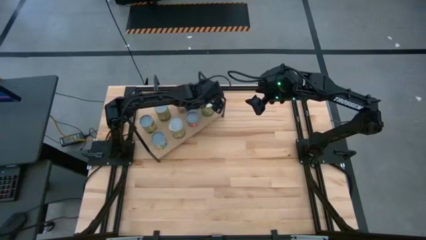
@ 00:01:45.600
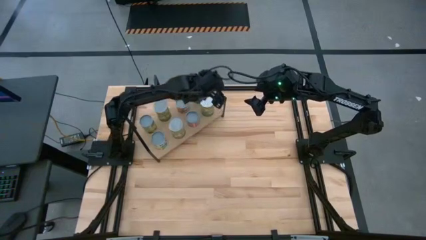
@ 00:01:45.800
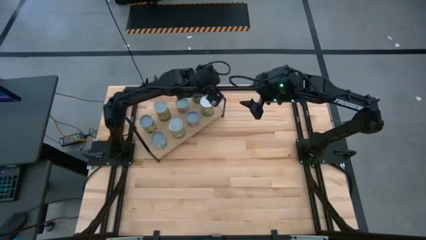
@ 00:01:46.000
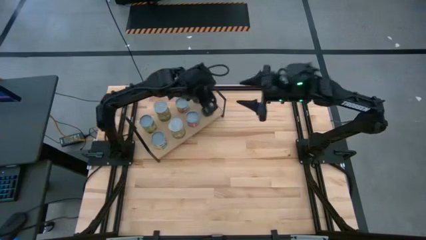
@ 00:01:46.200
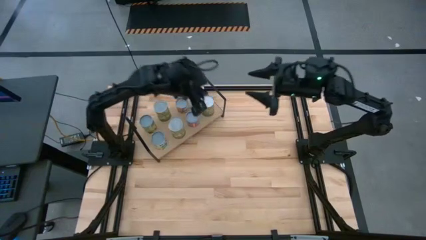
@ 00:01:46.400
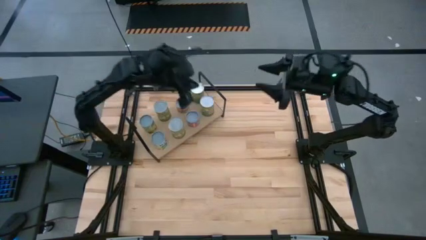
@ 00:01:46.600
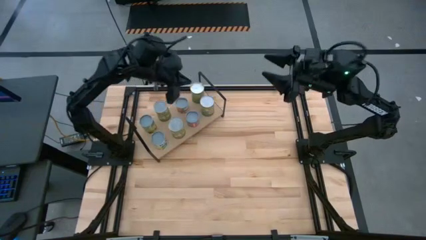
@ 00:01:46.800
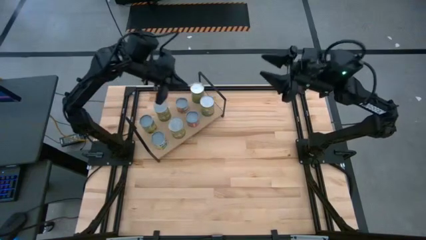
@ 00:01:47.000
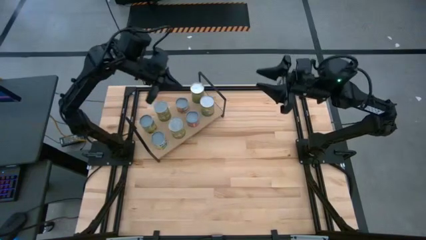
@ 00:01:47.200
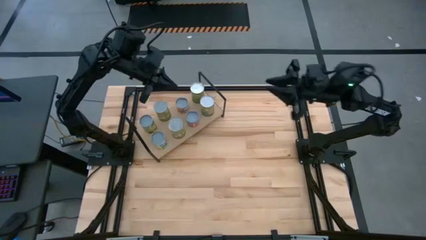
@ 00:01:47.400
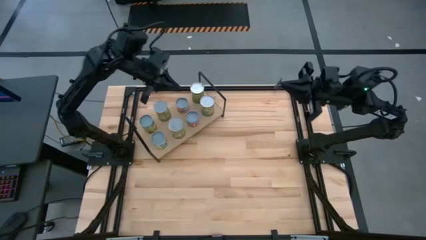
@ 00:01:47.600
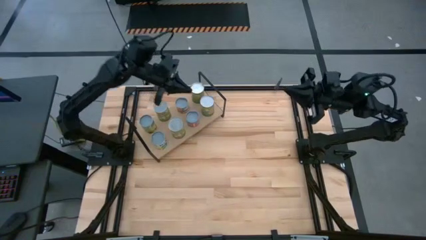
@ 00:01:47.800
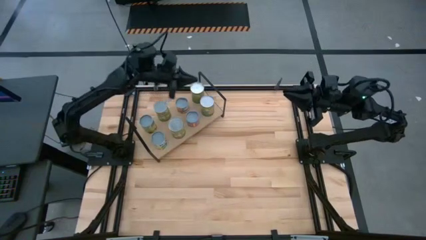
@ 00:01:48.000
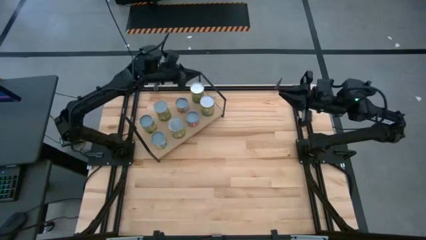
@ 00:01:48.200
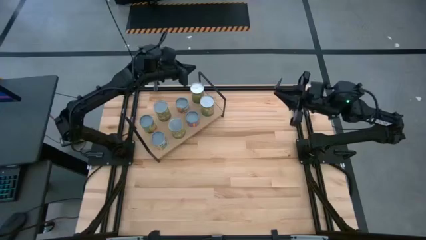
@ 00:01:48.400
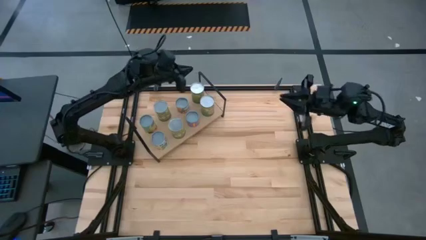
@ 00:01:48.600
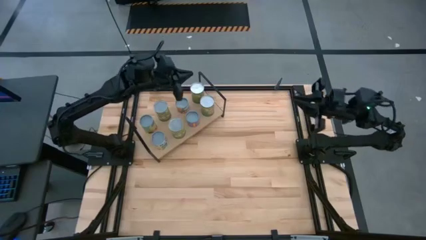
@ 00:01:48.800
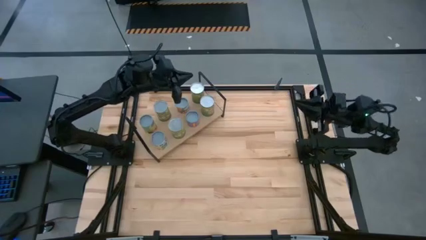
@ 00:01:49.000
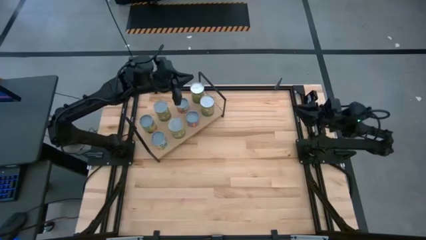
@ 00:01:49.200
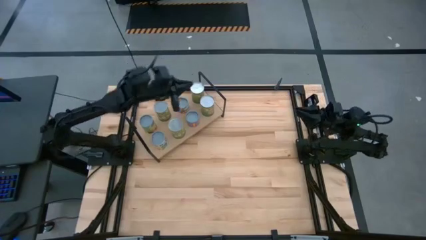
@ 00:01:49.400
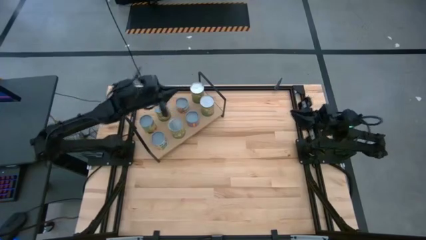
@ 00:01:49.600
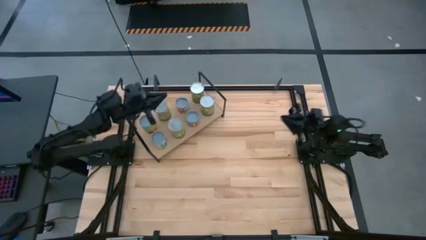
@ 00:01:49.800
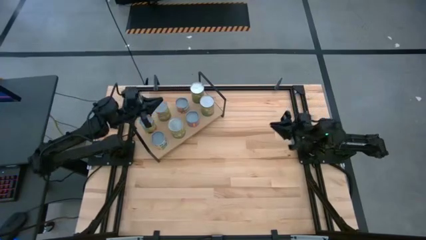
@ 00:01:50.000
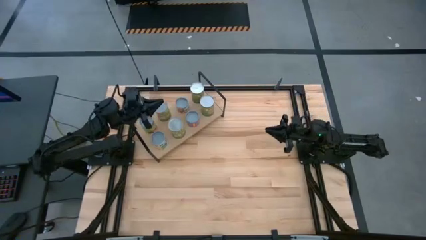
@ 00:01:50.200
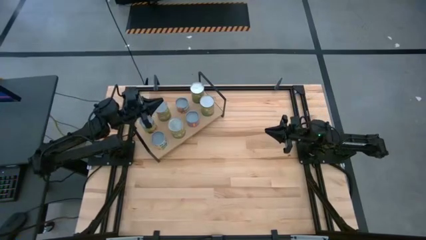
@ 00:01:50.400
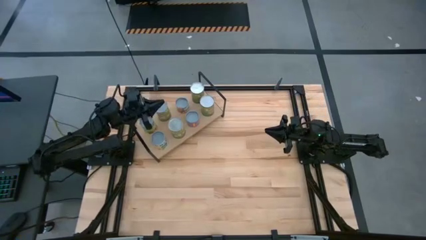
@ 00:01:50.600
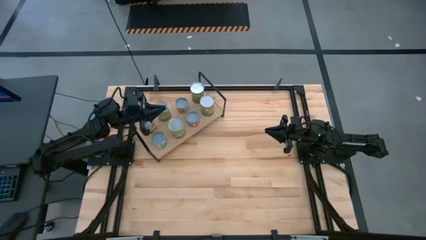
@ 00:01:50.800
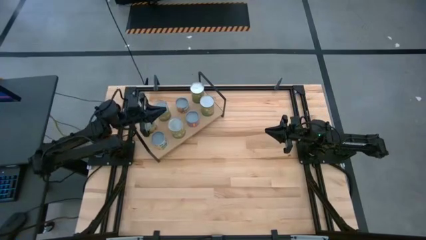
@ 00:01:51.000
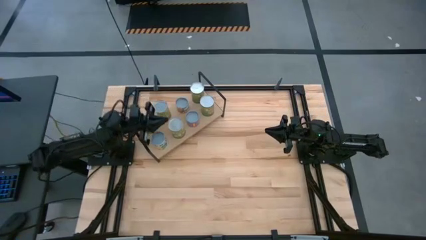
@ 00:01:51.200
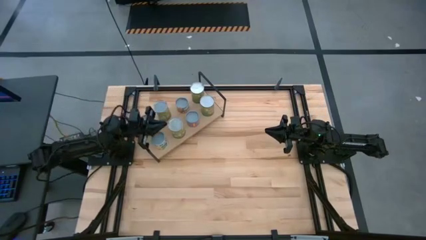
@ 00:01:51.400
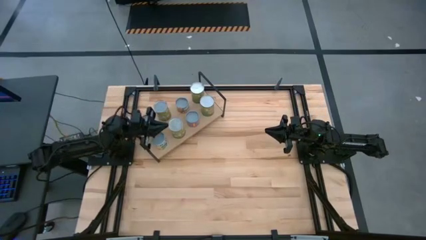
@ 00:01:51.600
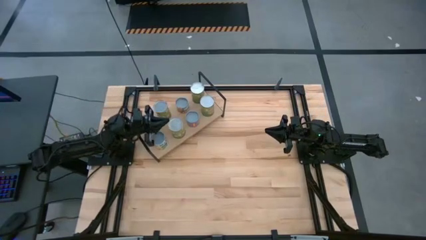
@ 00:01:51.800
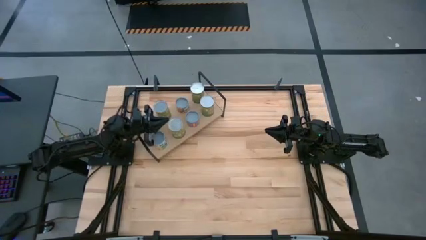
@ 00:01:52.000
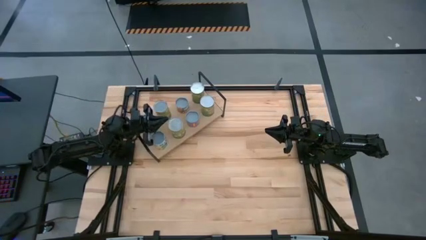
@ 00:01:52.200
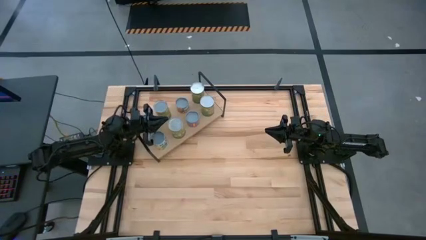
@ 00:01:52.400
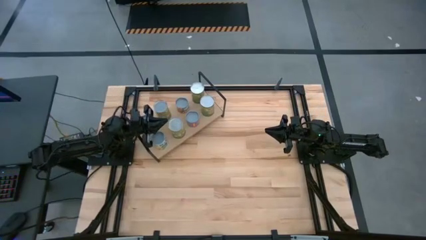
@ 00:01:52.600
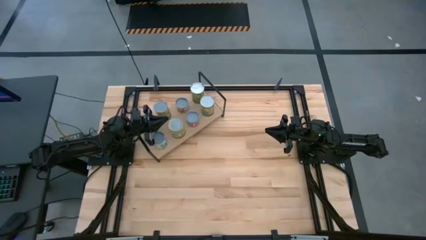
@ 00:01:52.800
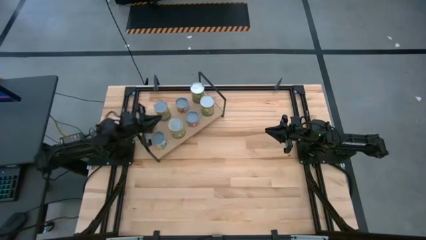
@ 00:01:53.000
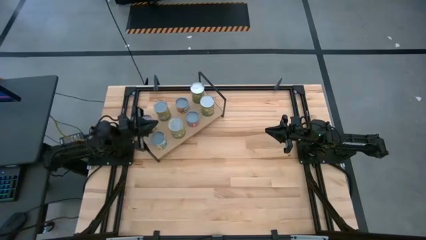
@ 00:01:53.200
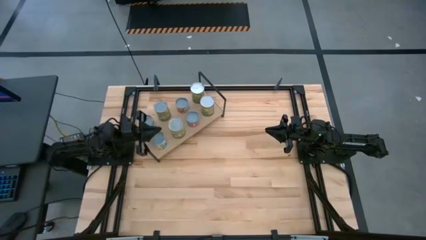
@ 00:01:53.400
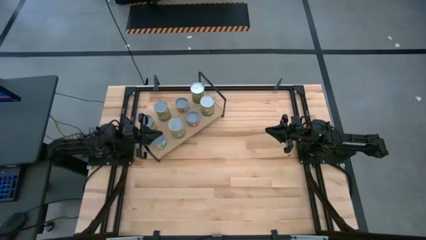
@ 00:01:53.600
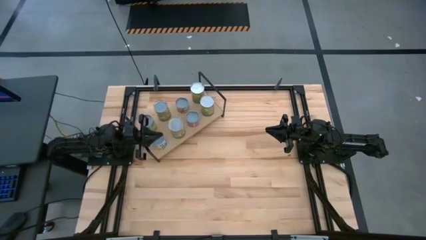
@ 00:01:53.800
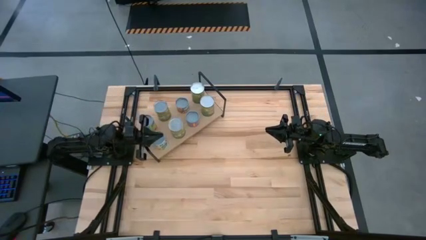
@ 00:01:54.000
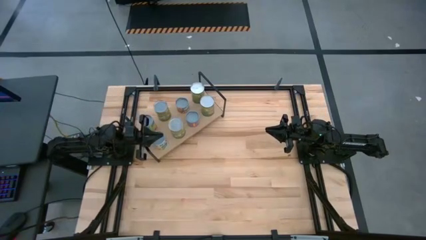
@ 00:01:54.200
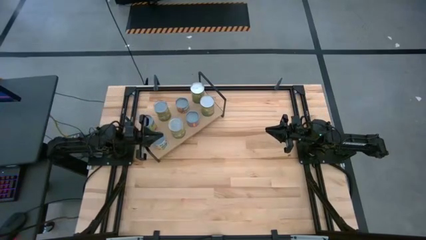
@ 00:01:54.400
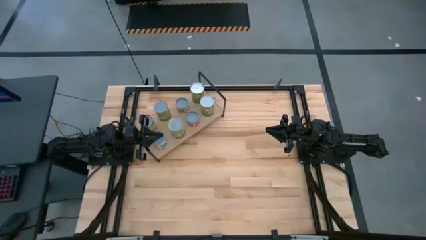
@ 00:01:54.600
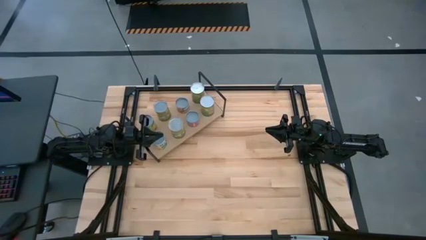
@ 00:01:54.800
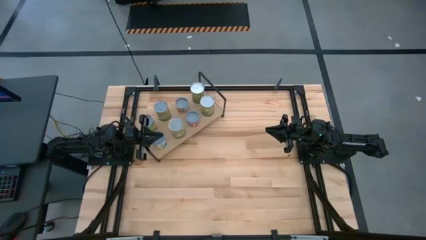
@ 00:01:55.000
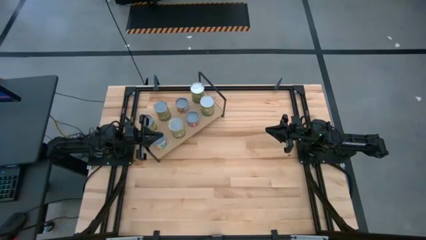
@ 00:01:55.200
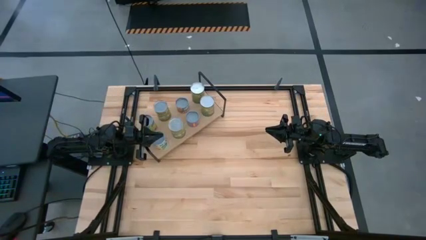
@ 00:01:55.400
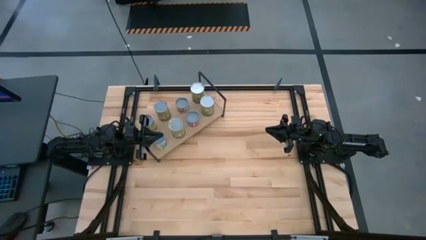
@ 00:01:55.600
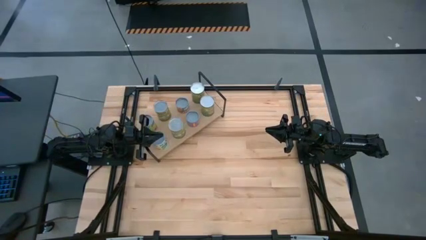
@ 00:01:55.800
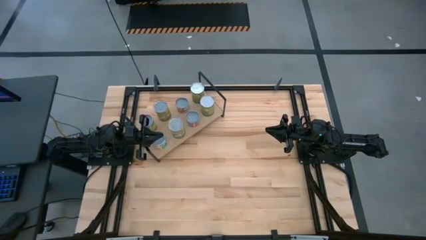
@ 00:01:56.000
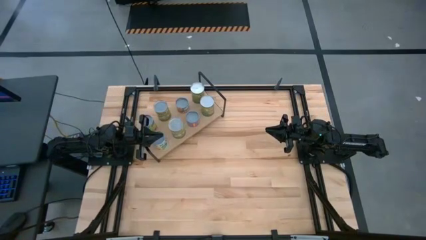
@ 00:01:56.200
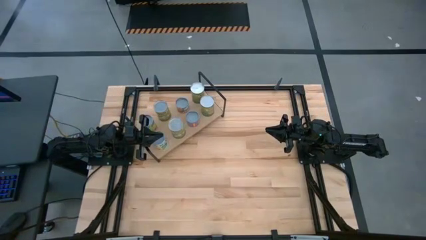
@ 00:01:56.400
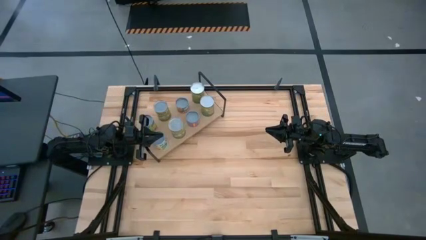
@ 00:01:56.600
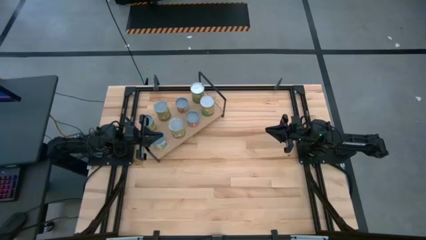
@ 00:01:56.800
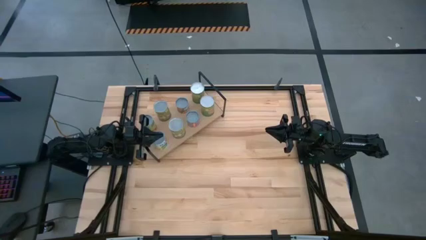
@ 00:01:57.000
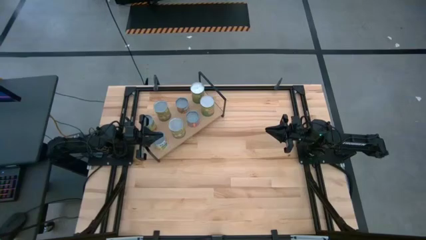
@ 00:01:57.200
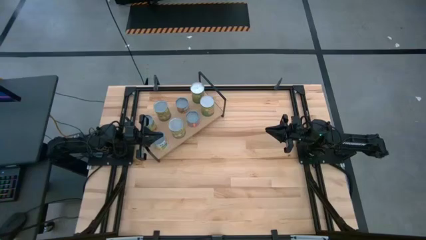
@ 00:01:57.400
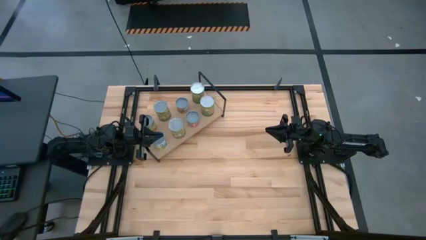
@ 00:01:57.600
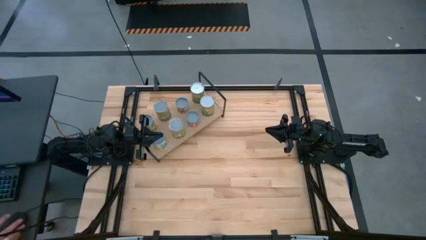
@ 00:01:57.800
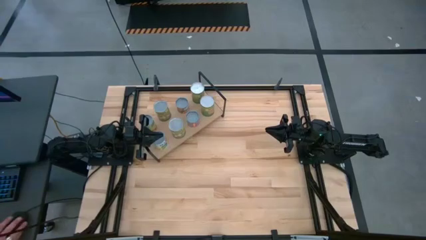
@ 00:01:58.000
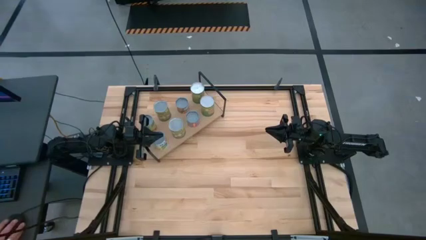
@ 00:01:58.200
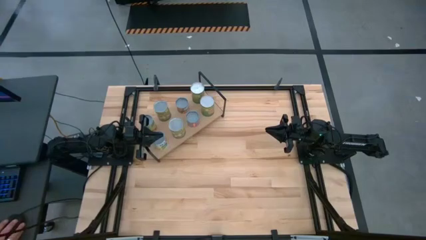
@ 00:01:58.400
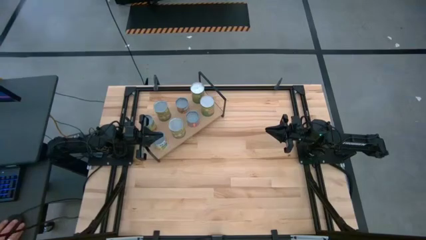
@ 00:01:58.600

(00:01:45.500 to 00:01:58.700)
Task: Pick and place cans onto a shelf
Return to Home Position
